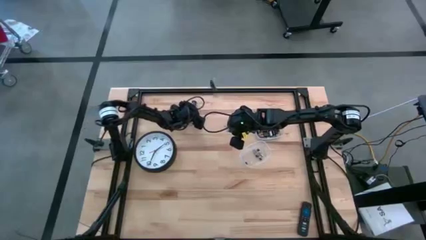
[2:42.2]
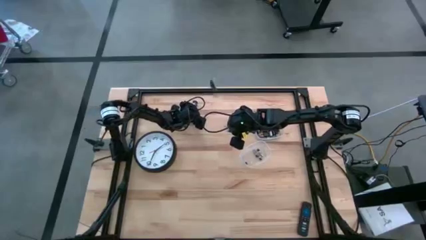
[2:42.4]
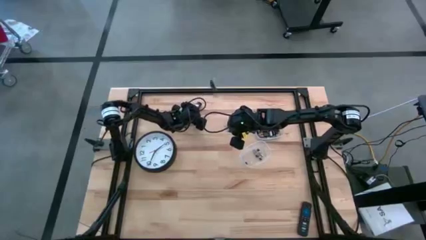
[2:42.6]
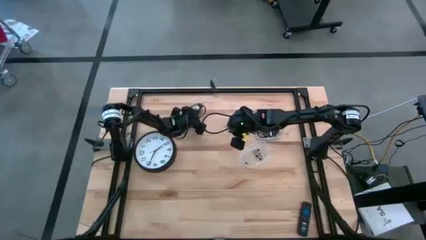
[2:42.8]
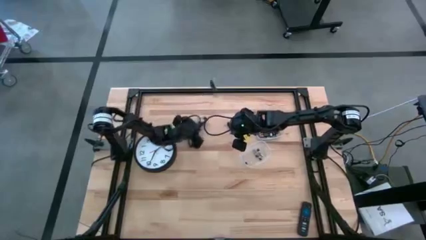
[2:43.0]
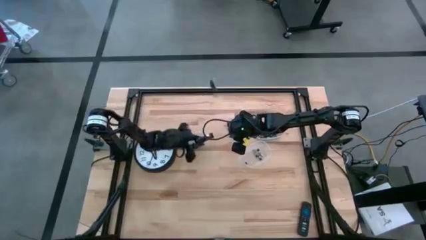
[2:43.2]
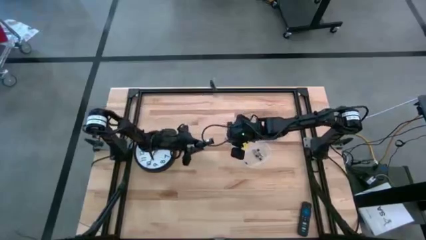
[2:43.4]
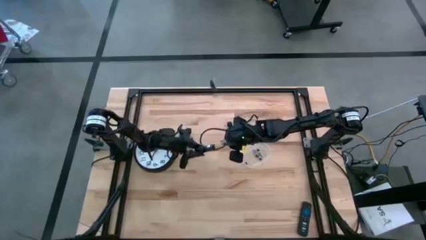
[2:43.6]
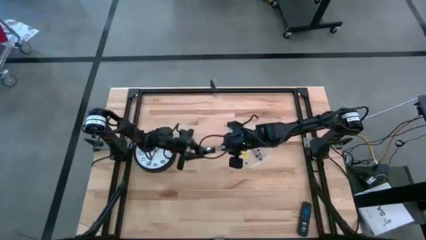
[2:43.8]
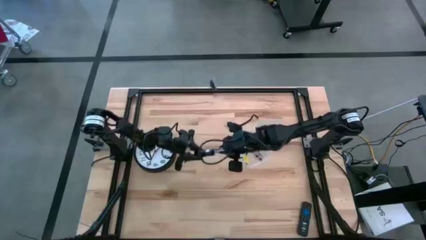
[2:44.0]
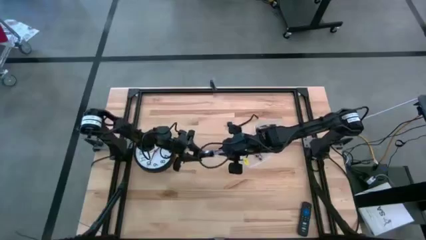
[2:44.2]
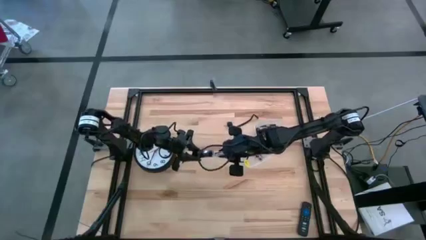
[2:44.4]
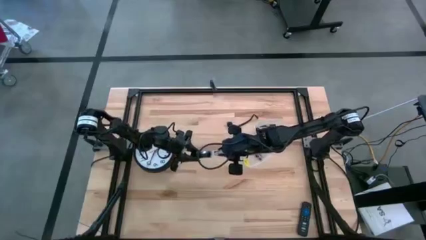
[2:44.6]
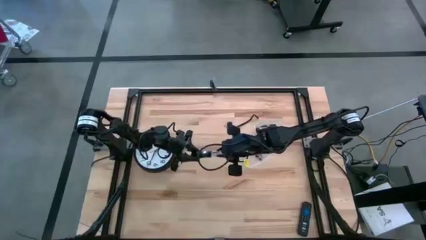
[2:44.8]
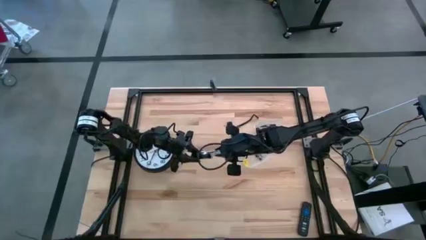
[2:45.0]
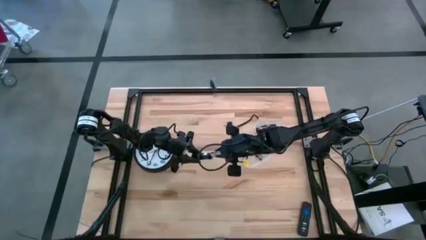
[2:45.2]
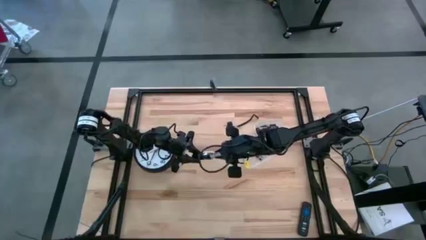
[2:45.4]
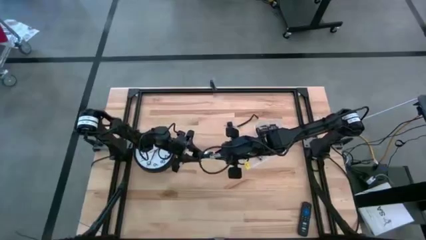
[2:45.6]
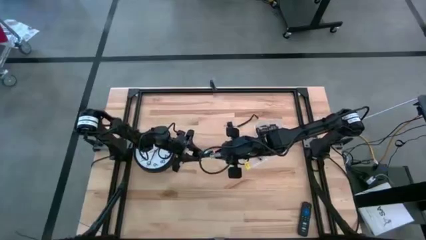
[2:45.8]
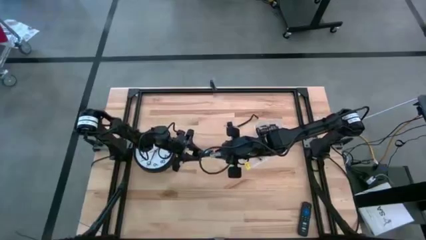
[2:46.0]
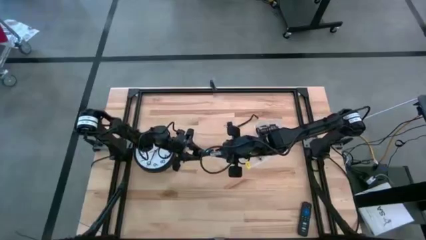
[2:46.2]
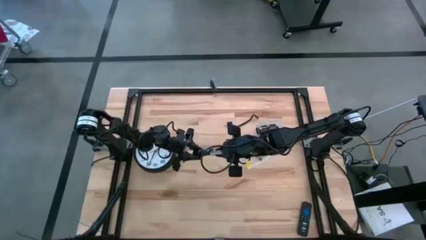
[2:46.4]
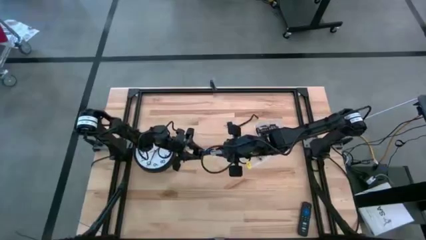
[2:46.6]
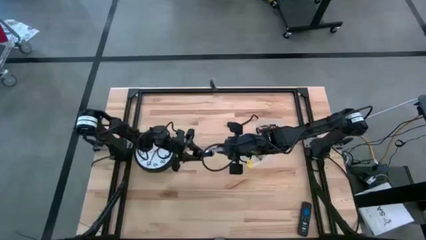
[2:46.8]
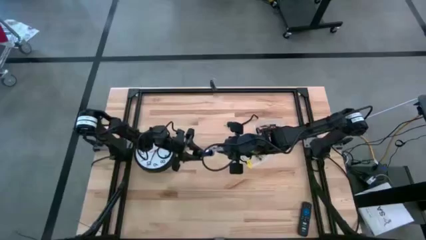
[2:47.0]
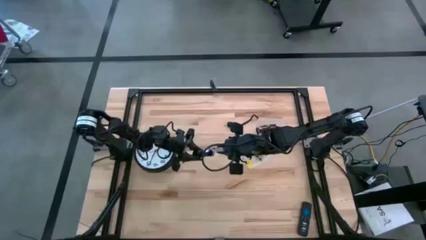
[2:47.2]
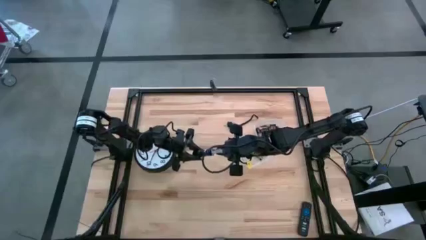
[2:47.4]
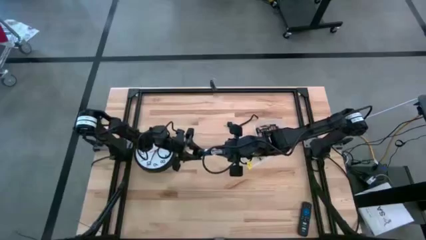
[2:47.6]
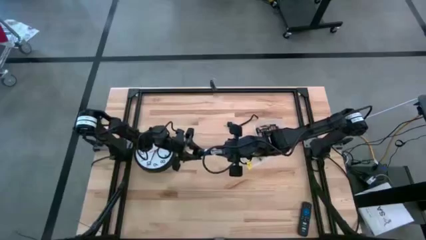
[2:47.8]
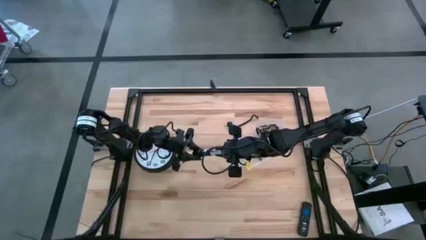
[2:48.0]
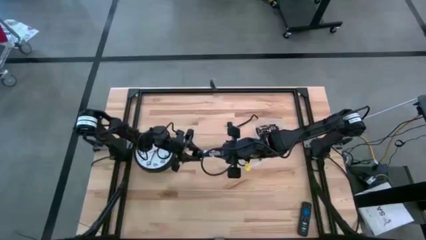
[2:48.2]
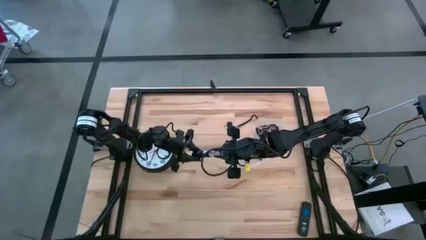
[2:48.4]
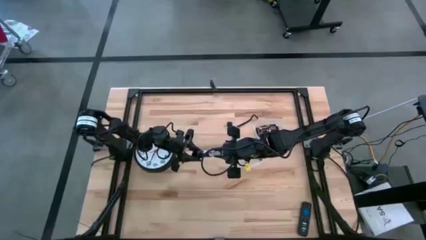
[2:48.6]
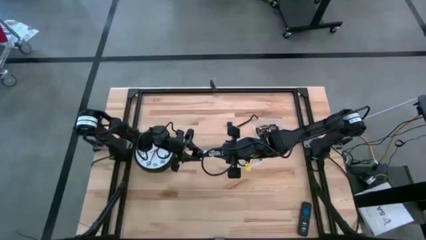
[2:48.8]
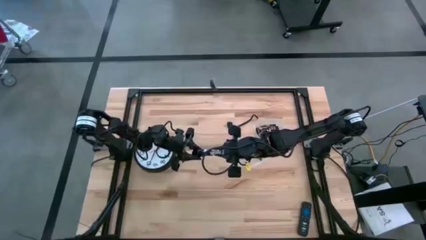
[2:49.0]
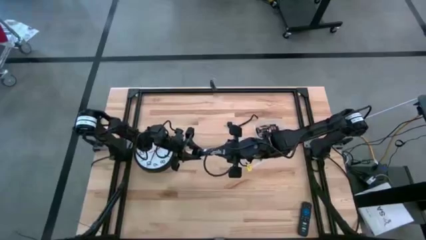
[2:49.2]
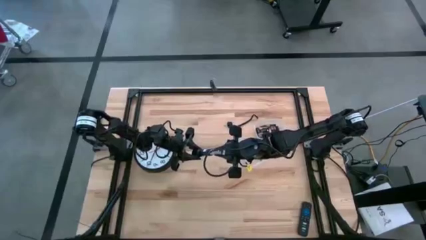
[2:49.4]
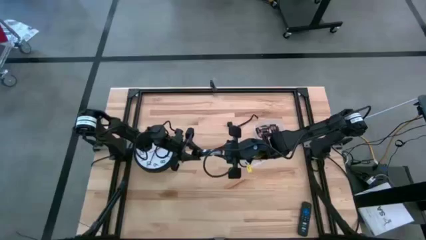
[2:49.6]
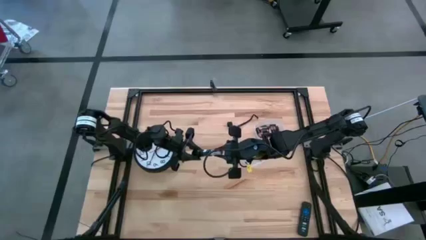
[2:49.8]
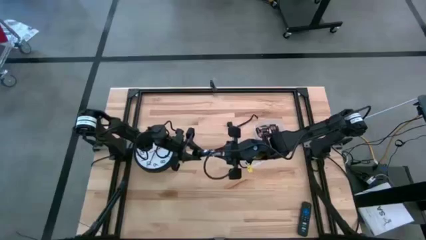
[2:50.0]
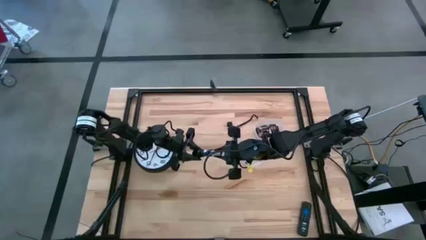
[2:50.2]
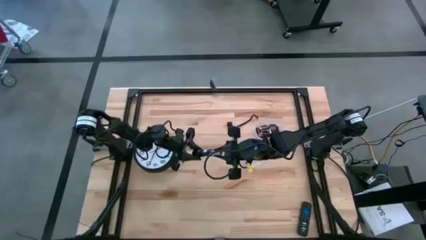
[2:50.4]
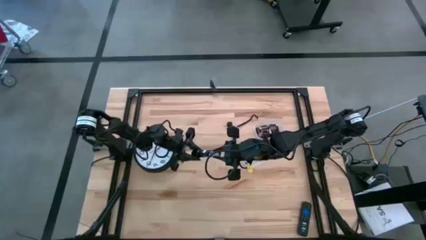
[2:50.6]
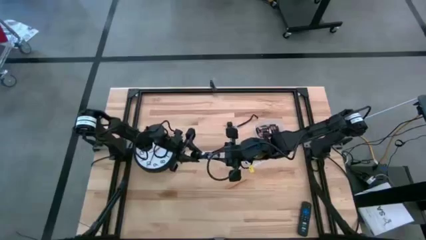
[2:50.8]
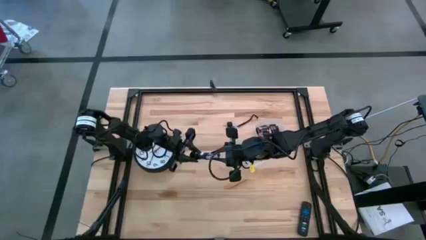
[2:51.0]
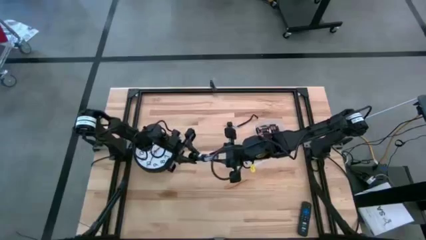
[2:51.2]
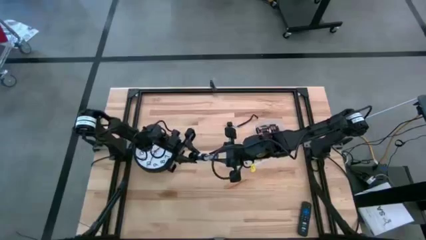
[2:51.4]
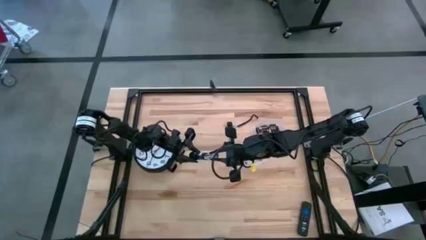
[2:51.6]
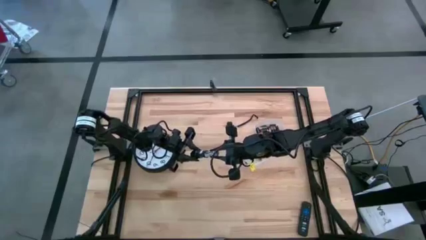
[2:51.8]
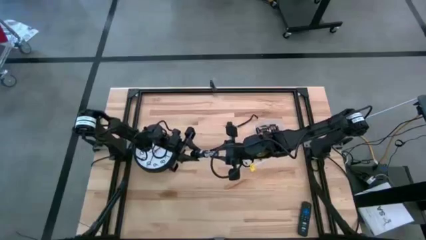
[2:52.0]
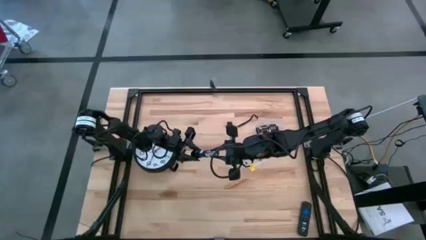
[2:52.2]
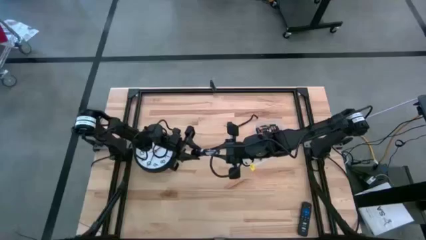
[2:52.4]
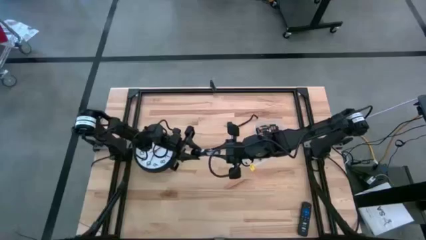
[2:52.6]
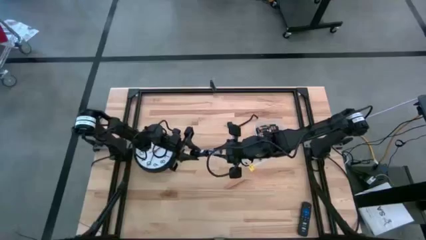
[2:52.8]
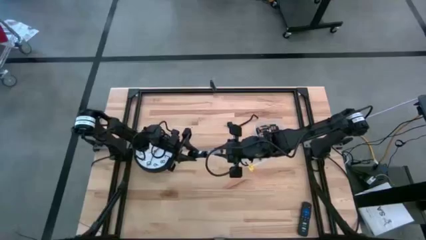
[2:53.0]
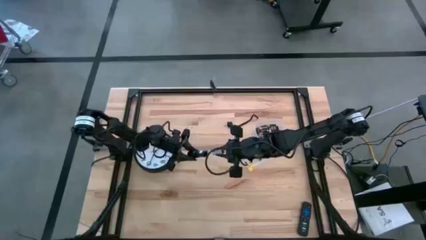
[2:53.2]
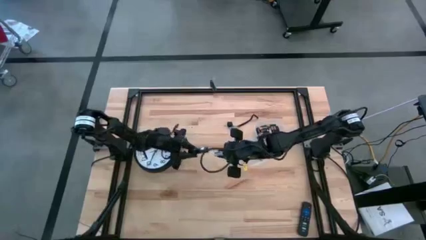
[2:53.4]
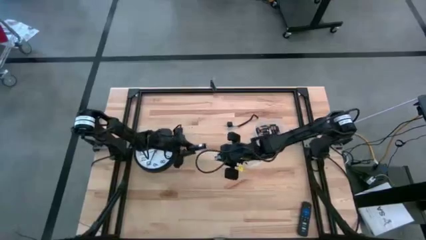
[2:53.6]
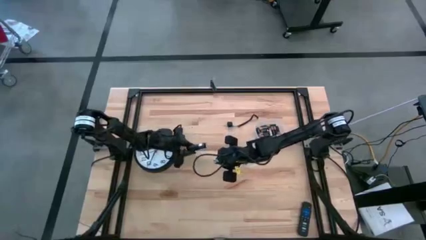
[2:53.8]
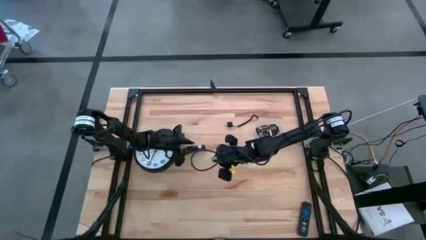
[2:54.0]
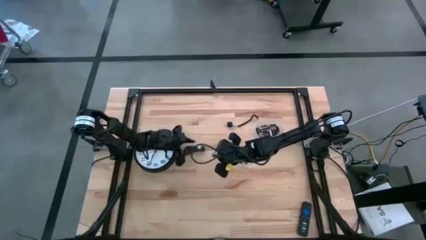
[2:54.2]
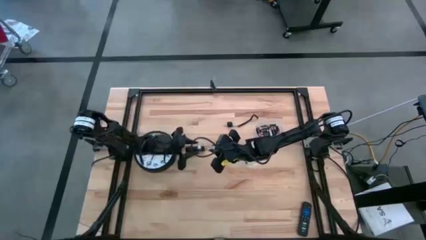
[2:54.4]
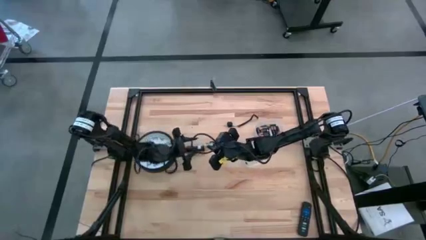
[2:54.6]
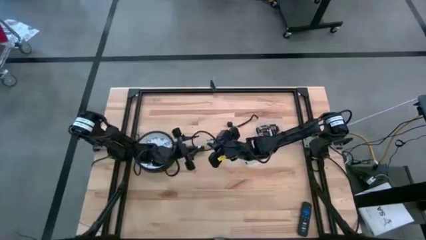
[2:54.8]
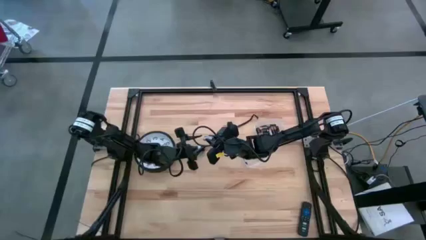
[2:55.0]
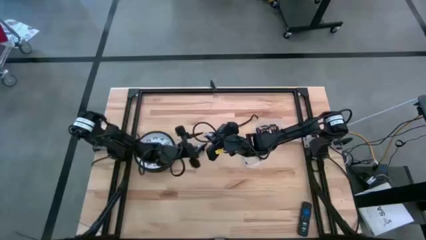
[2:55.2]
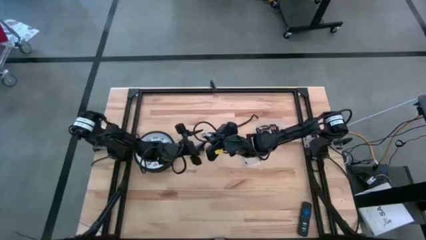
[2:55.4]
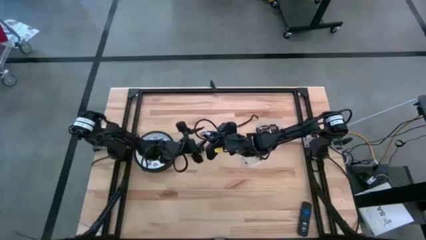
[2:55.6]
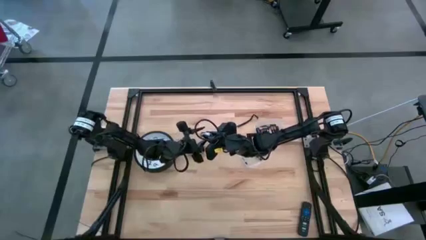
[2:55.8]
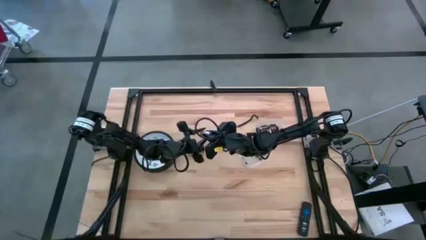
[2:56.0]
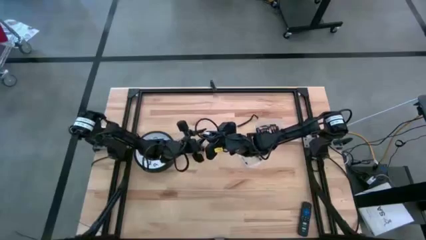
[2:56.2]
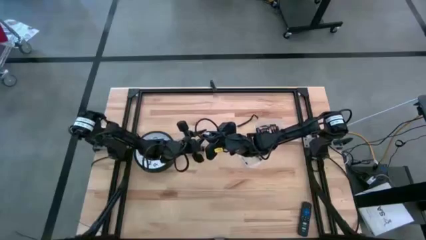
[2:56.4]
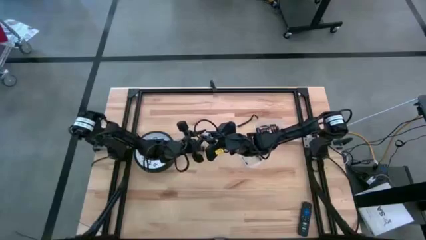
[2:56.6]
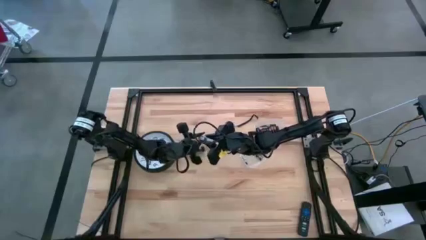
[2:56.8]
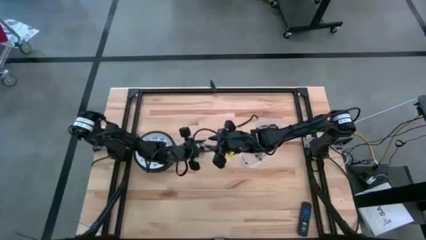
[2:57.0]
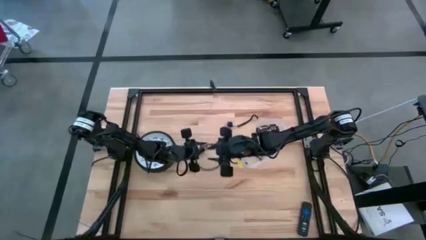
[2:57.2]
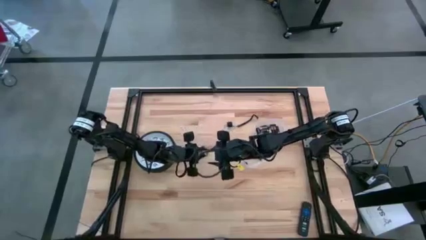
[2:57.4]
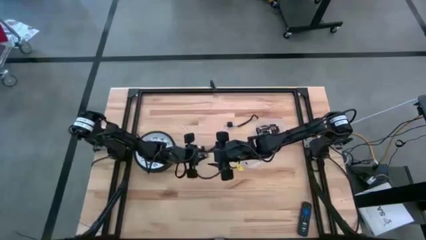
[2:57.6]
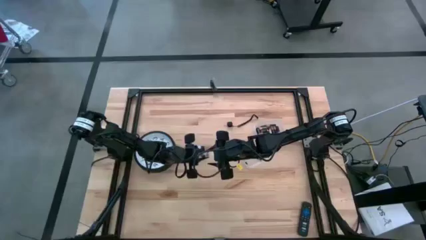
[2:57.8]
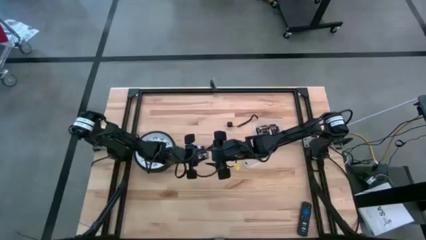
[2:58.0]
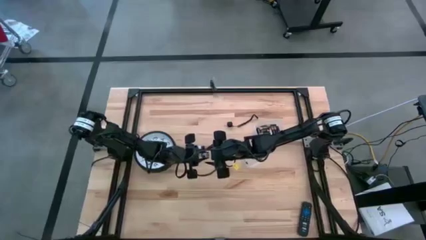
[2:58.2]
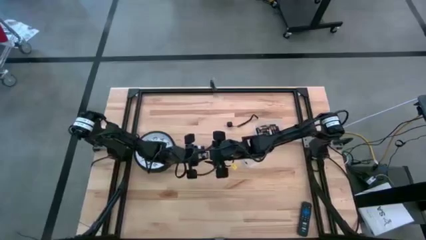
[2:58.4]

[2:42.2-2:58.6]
Task: Insert battery
Insert the white battery holder into the white flashlight compartment

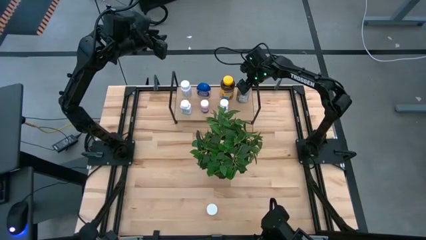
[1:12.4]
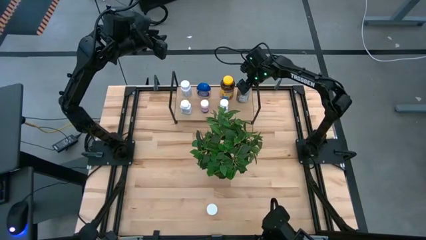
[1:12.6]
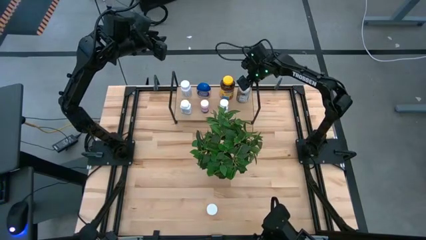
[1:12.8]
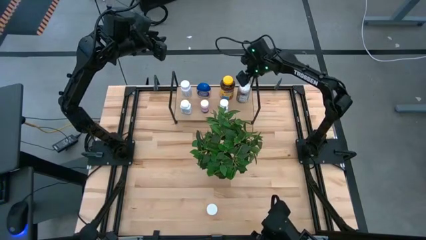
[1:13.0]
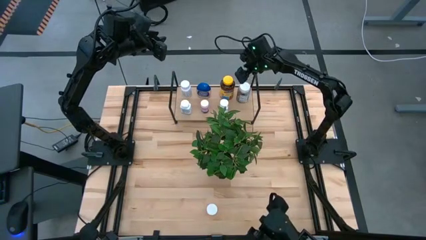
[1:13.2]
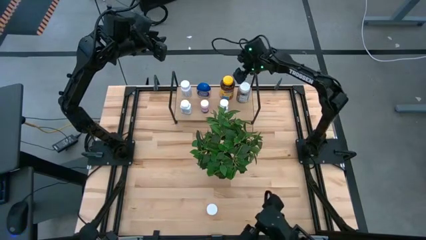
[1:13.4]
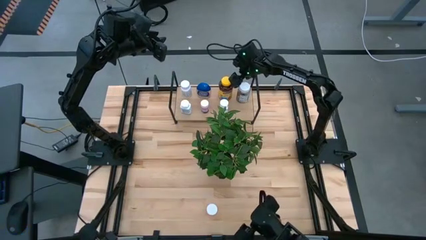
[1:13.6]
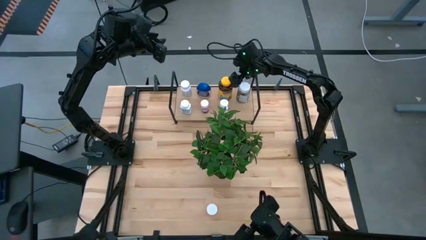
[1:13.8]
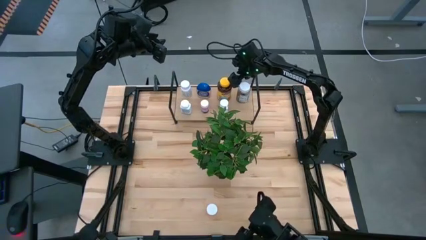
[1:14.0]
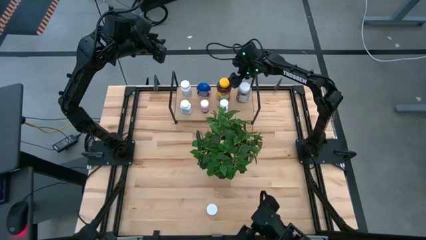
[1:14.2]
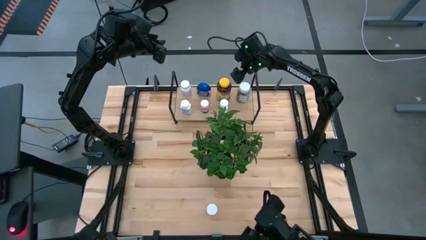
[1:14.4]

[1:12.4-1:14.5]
Task: Pick and place medicine bottles onto shelf by color
Adjust the yellow pill bottle on the shelf
